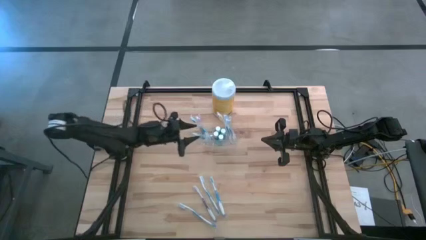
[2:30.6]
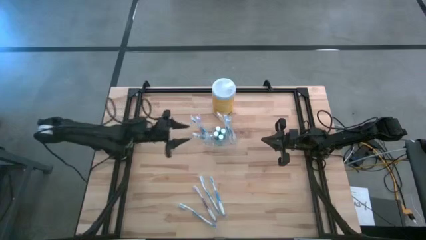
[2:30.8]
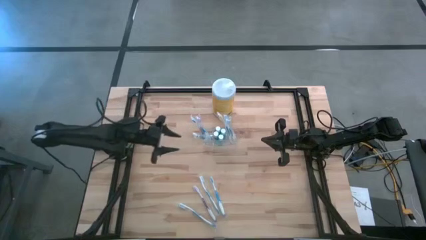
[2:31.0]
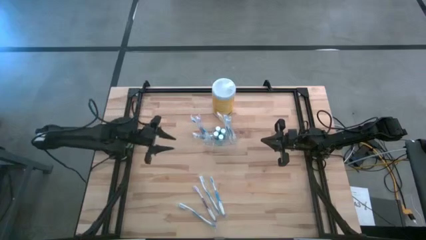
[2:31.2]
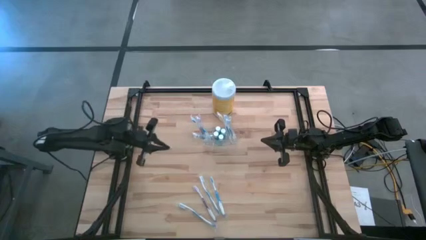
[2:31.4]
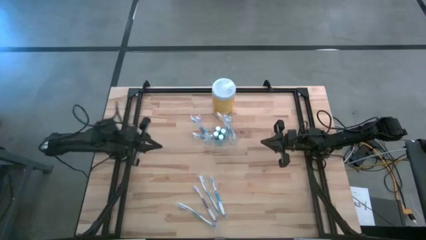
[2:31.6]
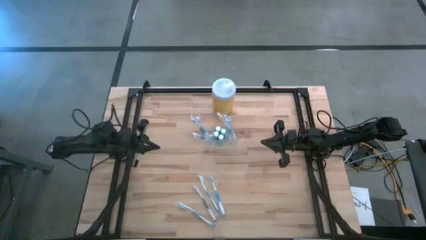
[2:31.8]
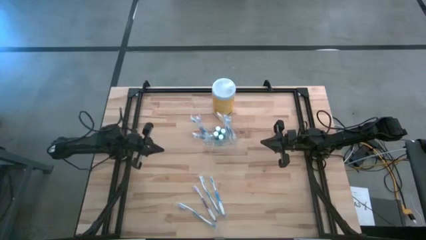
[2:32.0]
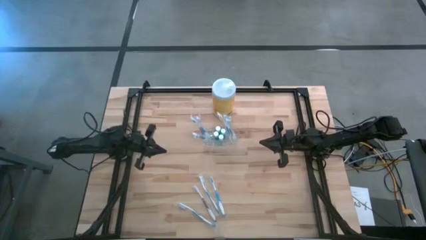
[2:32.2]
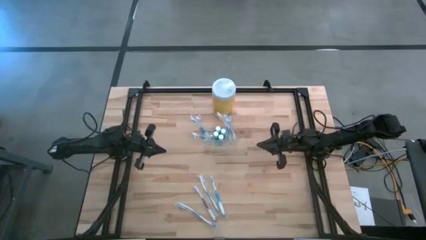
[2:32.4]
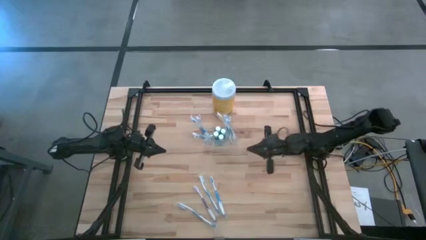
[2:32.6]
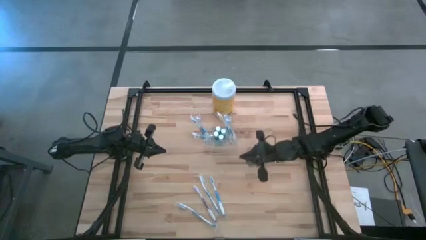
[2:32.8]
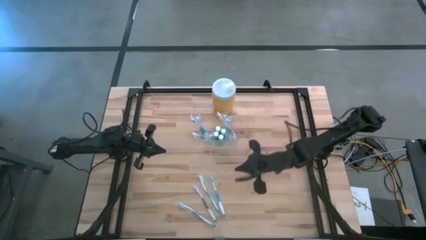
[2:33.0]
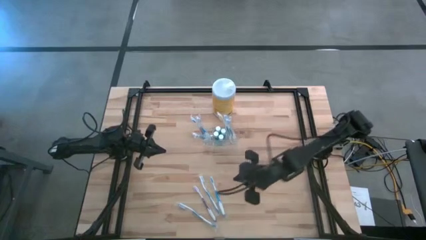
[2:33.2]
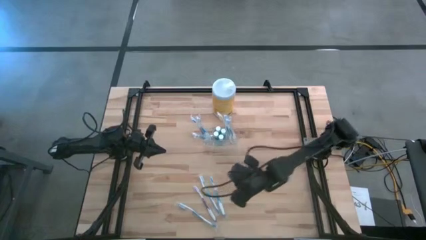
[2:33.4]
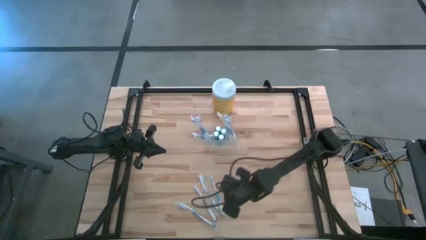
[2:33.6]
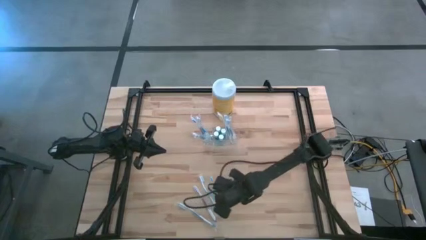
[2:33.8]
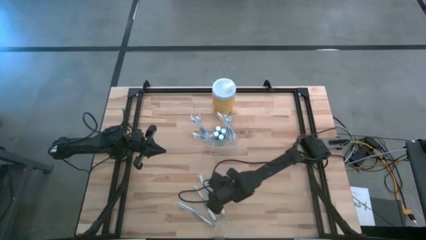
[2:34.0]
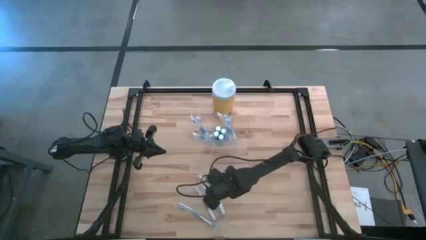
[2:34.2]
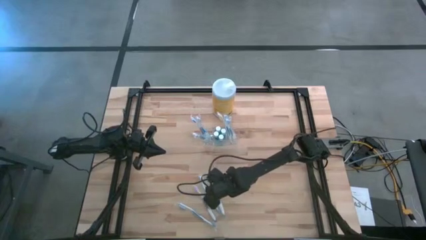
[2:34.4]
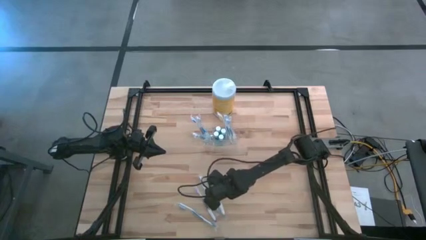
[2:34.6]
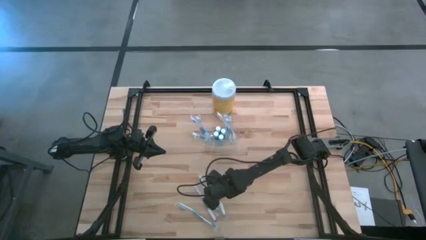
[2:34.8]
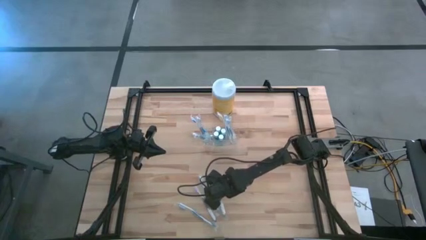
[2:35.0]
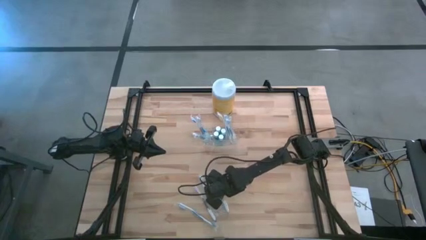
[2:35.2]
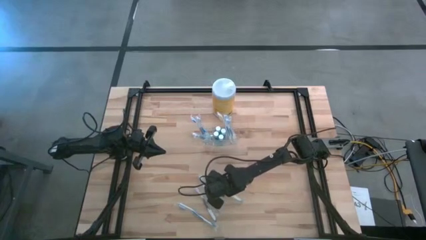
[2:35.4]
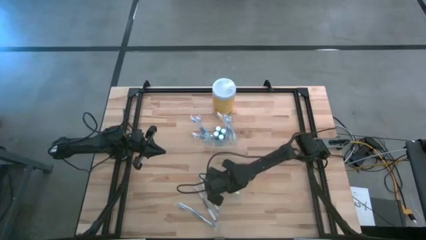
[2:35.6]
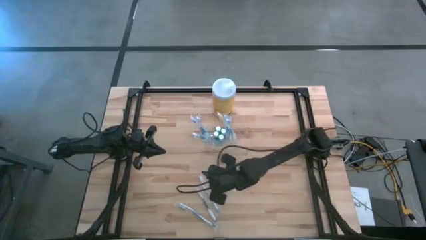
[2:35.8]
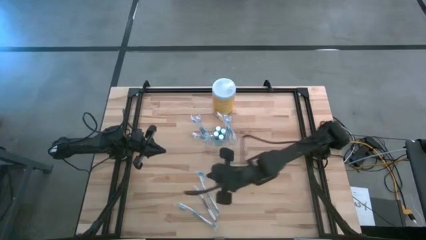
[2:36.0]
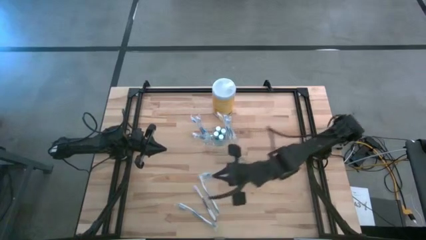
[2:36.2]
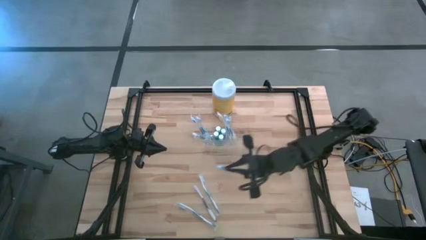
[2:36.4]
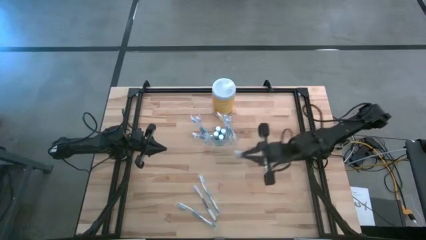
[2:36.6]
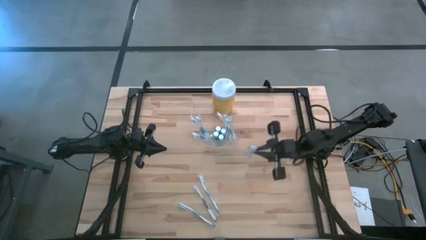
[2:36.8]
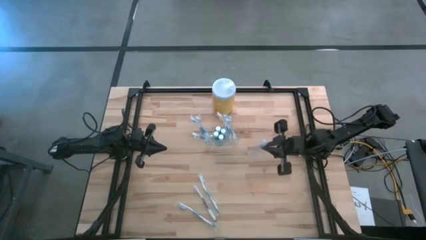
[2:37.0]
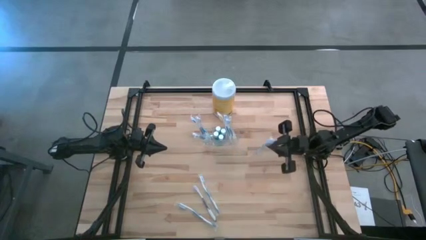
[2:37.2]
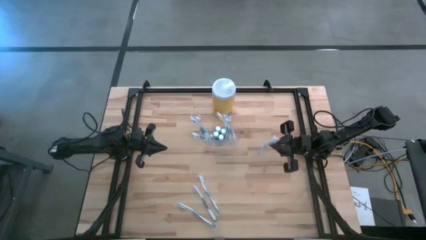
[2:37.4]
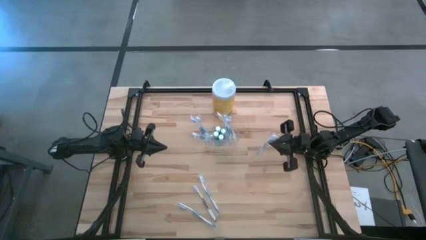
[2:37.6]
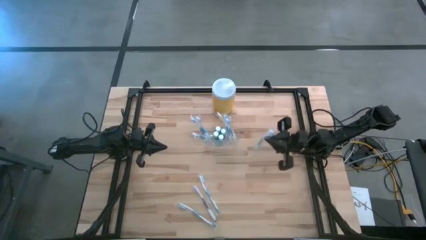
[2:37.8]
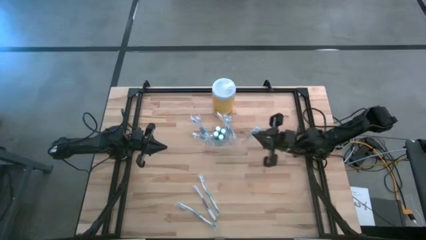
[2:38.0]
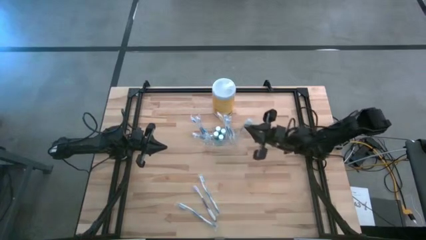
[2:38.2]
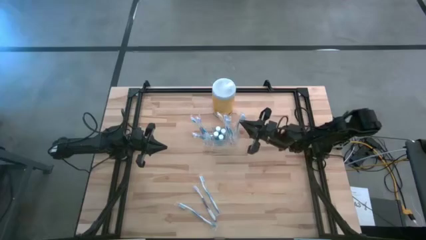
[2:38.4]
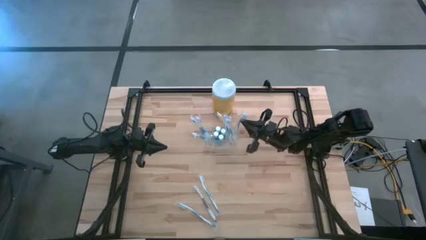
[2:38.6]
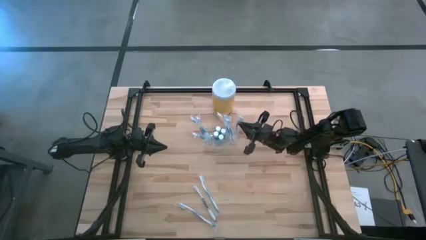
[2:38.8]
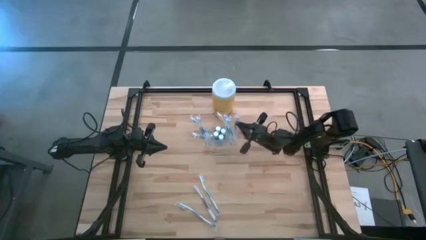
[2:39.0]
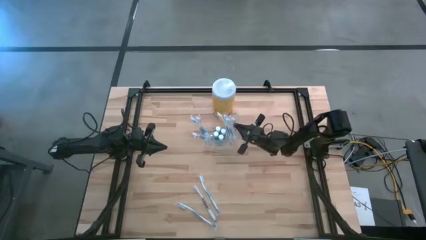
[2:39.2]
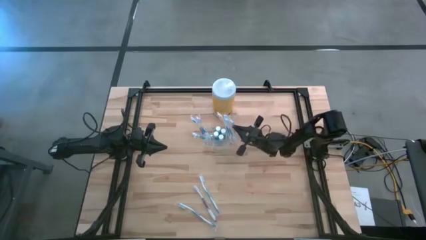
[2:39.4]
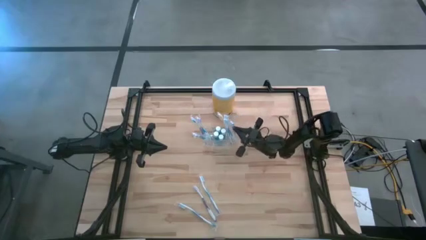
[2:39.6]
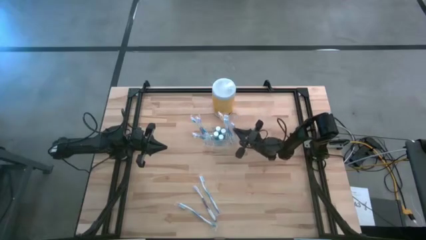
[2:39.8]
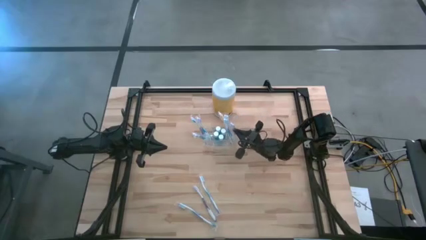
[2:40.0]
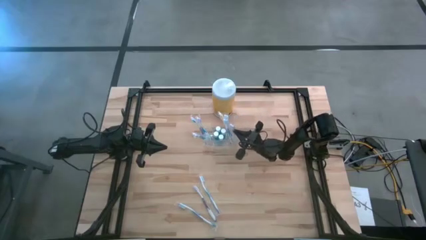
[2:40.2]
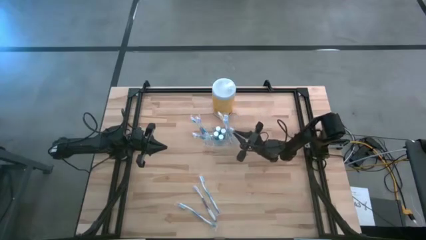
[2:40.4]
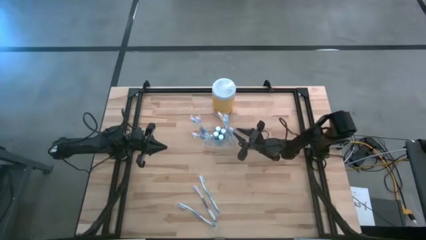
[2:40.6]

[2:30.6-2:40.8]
Task: Pick & Place toothbrushing station
Put the blue toothbrush into the transparent organizer

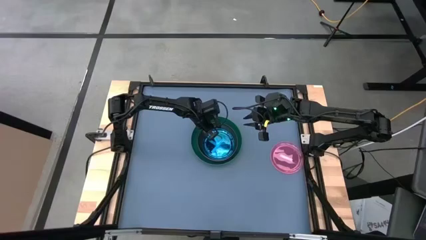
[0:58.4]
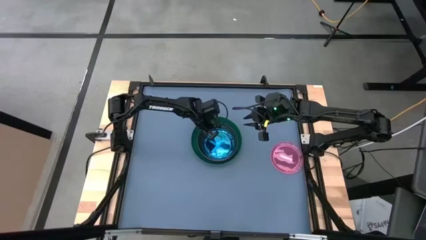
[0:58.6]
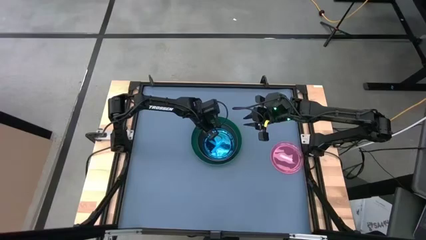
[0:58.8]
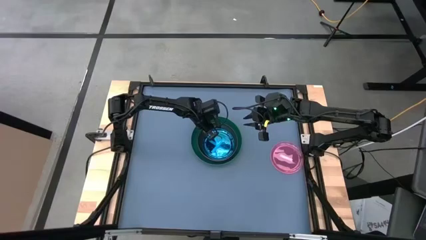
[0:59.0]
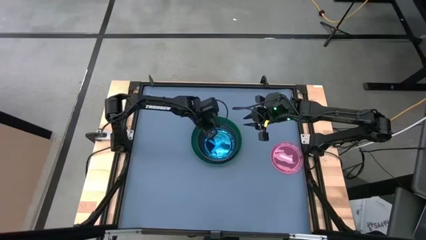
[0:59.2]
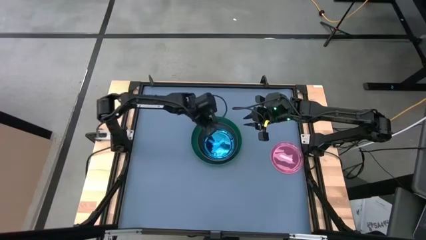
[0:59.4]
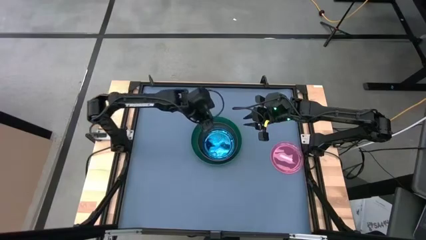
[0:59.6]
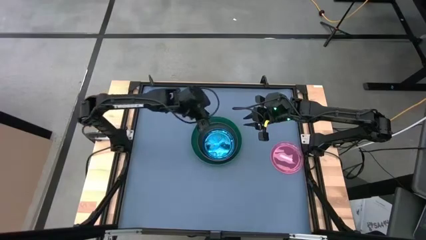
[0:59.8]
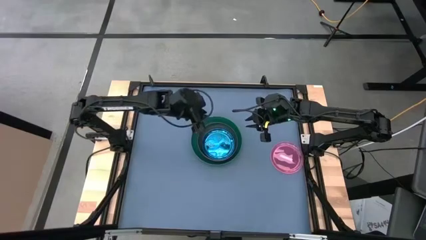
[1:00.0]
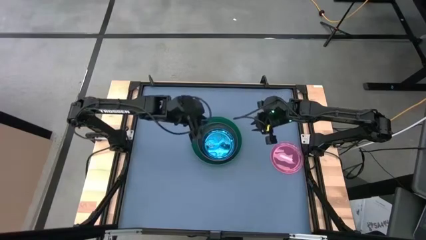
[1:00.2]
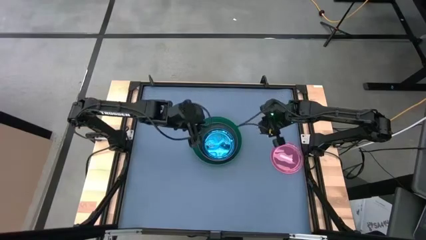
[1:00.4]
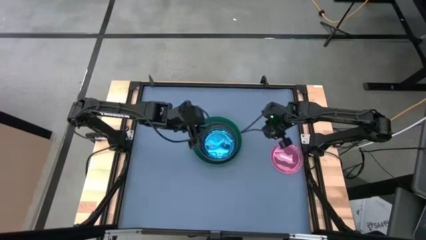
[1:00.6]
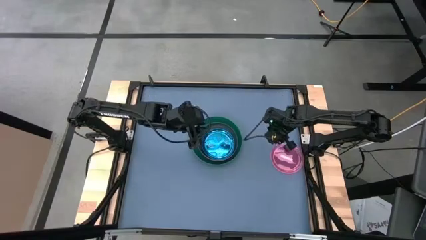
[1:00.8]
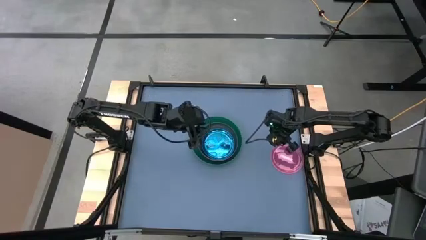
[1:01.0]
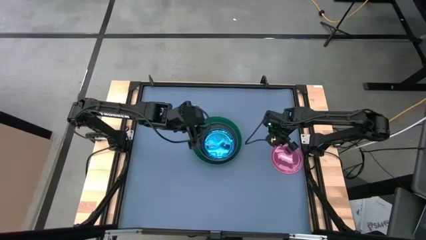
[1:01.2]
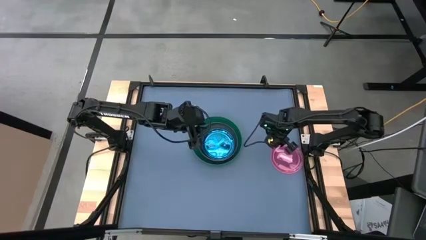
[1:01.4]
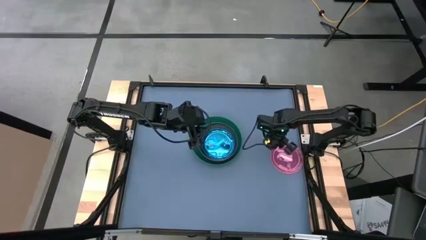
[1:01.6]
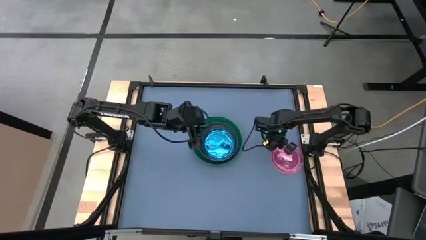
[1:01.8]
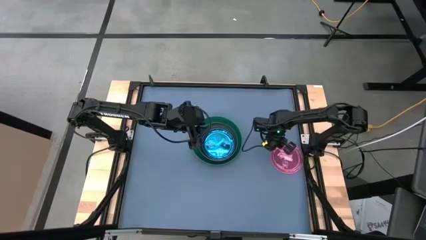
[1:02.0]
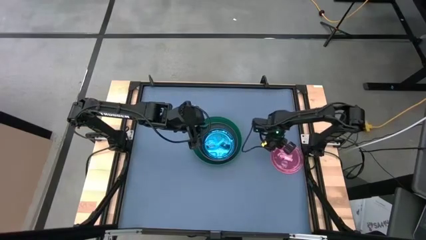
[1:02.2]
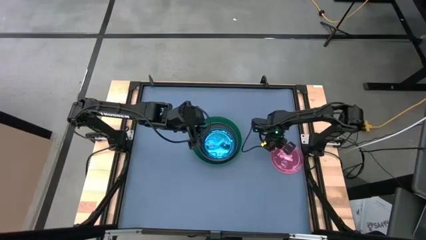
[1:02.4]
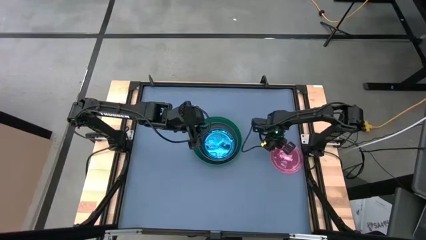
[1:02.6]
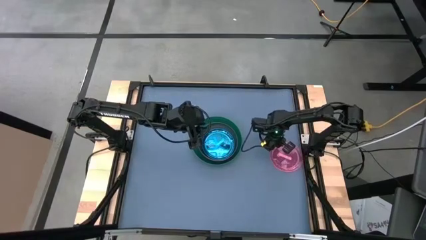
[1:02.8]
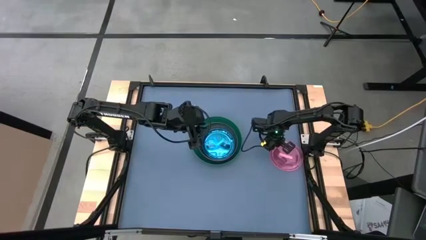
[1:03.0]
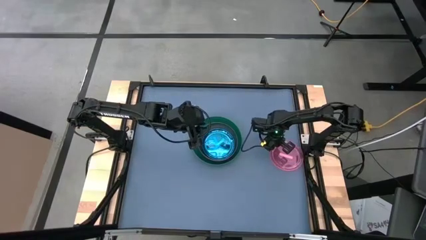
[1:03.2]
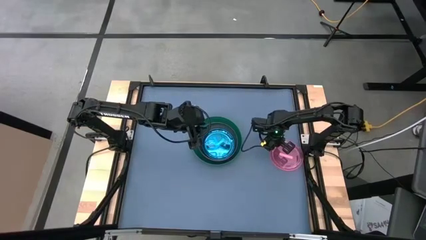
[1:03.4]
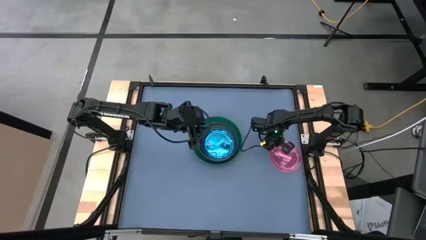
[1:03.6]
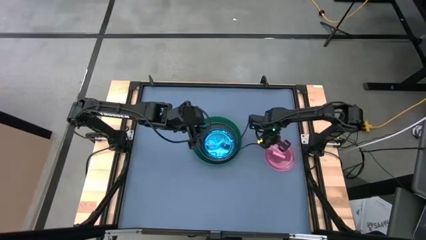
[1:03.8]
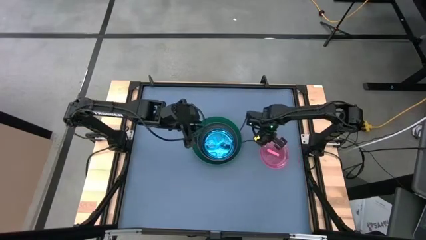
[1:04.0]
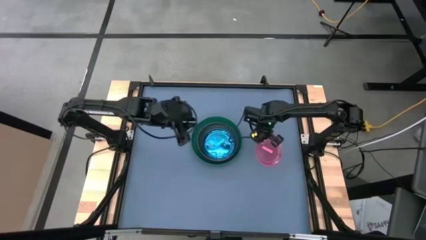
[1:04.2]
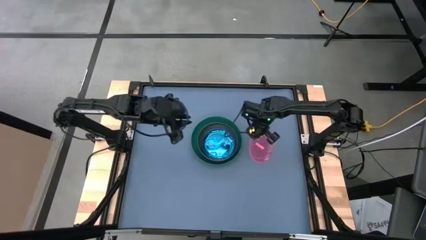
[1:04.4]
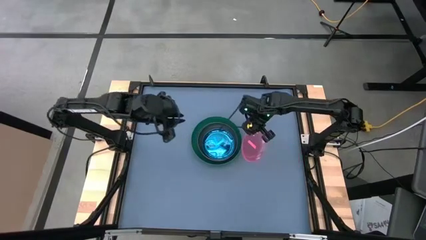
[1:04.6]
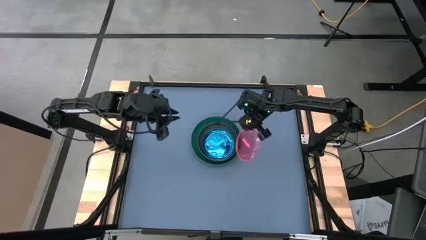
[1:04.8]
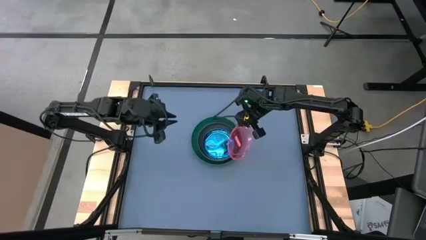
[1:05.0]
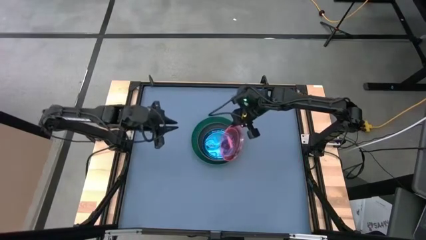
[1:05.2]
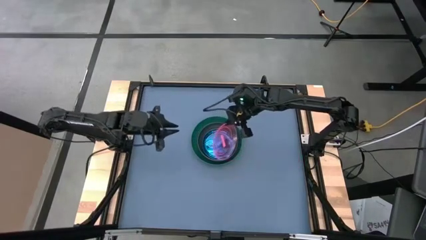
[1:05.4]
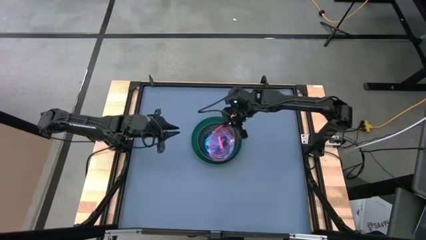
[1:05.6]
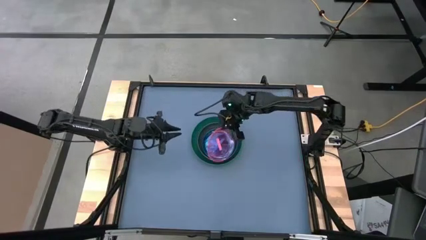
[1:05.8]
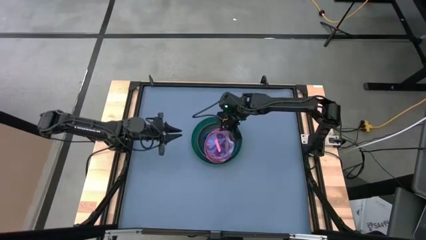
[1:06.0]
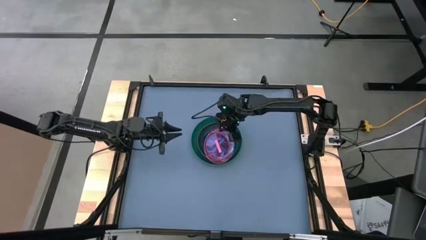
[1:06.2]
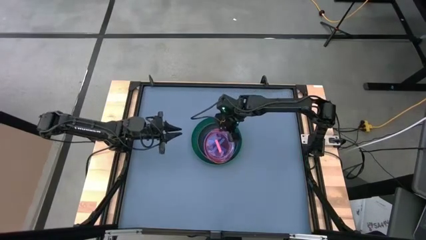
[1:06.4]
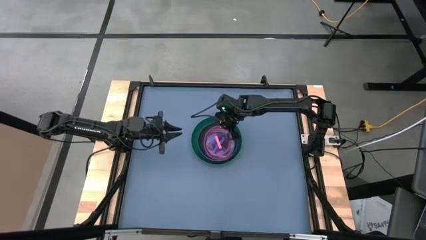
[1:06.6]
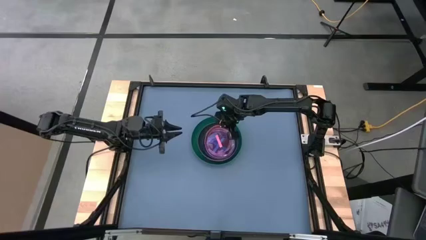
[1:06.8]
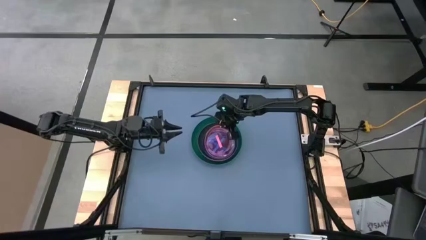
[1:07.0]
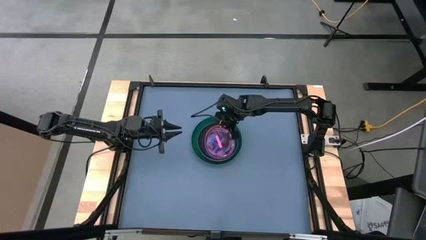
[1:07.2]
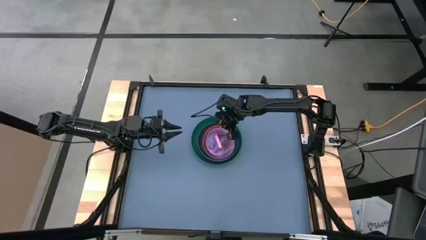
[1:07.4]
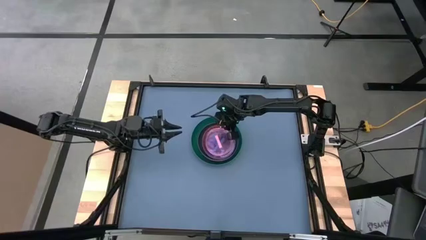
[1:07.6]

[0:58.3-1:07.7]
Task: Stack plastic plates
Stack the transparent pink plate on top of the blue plate
